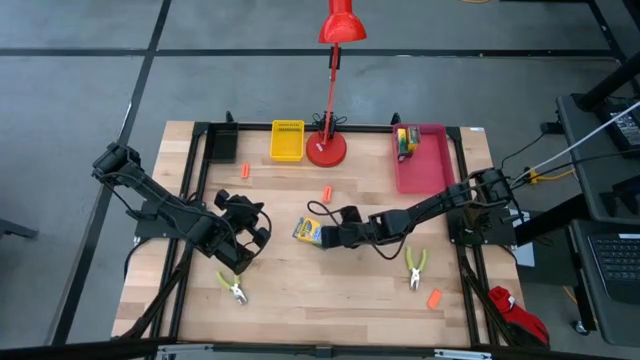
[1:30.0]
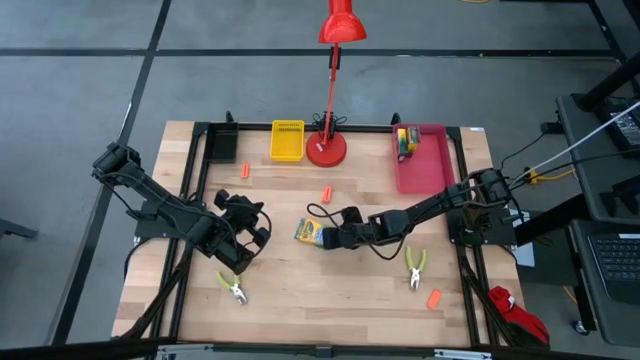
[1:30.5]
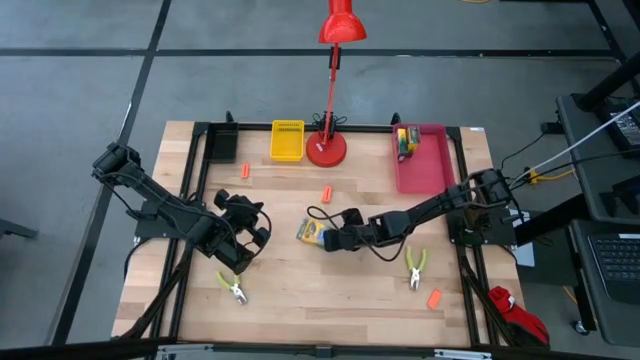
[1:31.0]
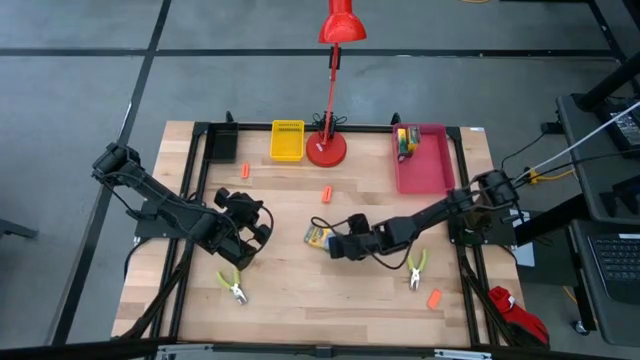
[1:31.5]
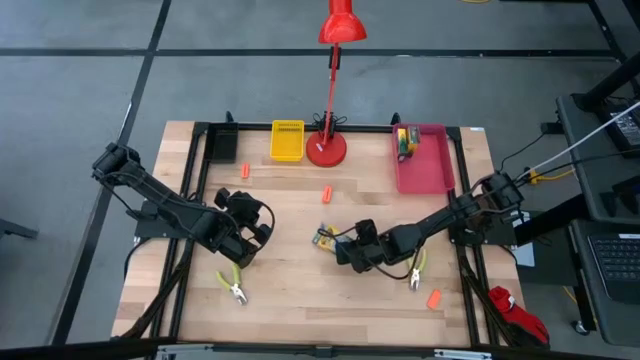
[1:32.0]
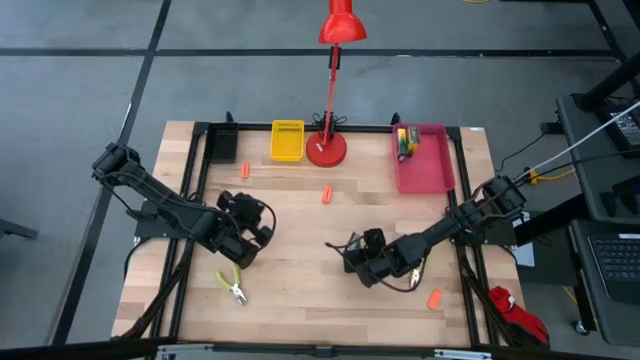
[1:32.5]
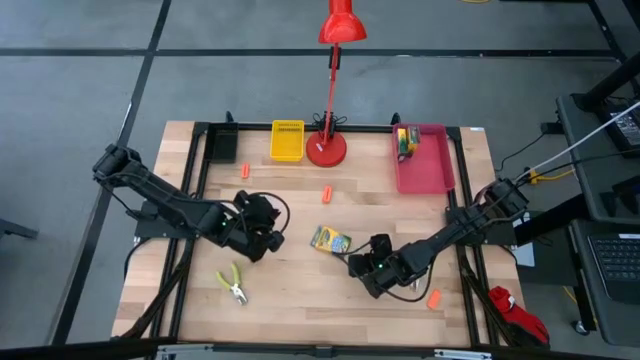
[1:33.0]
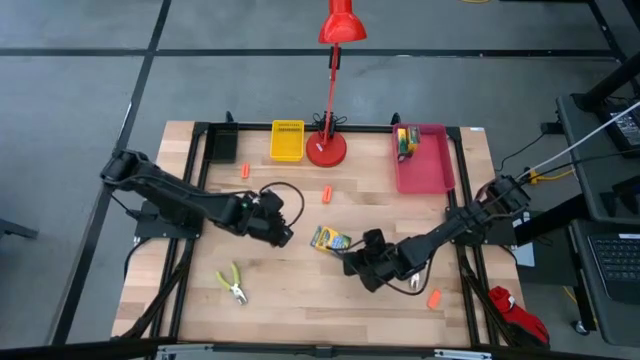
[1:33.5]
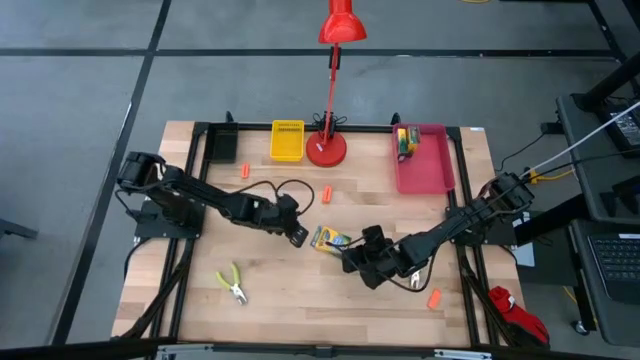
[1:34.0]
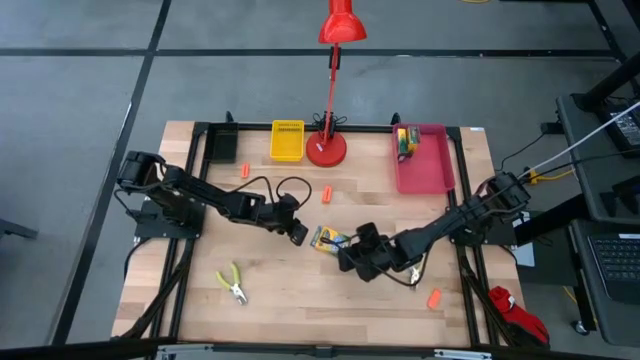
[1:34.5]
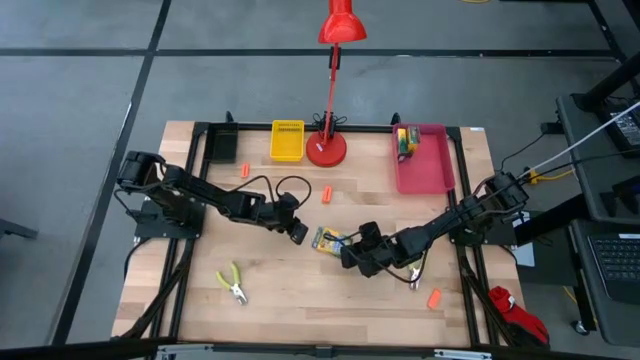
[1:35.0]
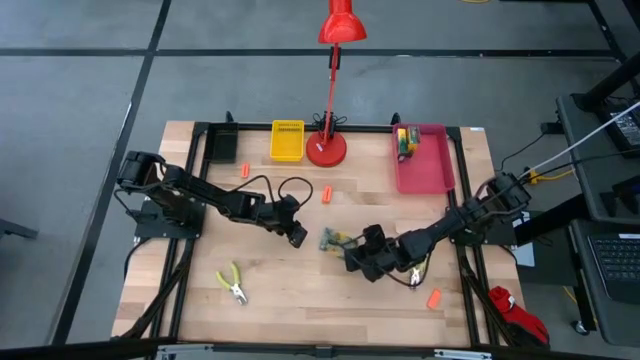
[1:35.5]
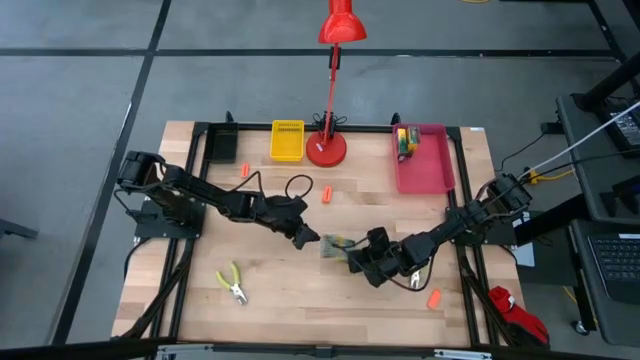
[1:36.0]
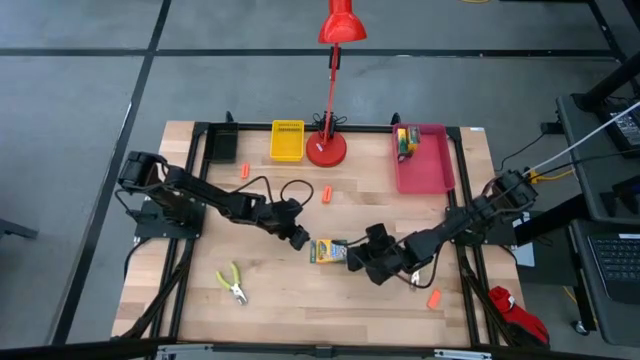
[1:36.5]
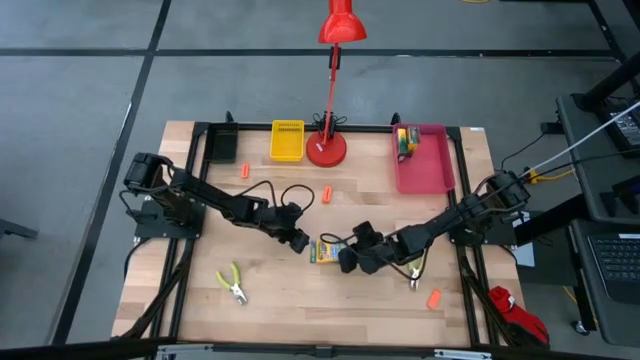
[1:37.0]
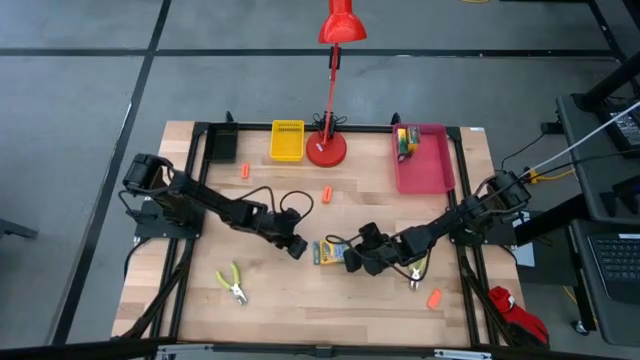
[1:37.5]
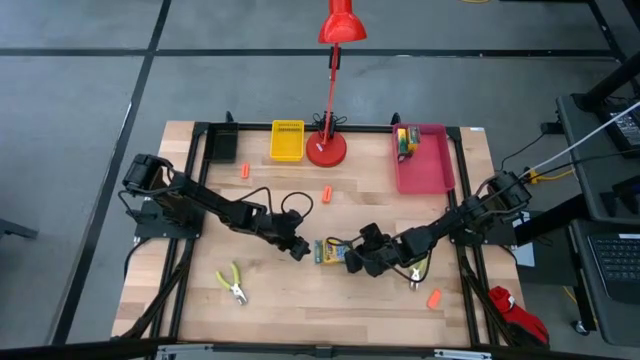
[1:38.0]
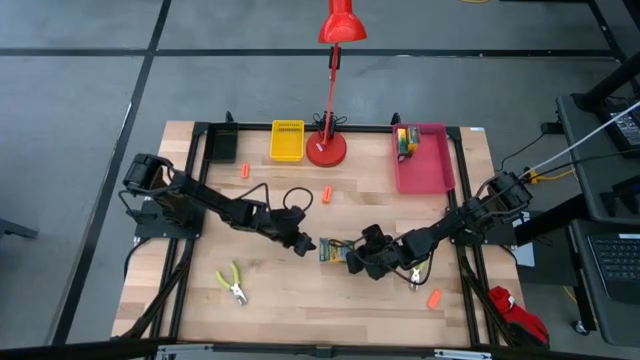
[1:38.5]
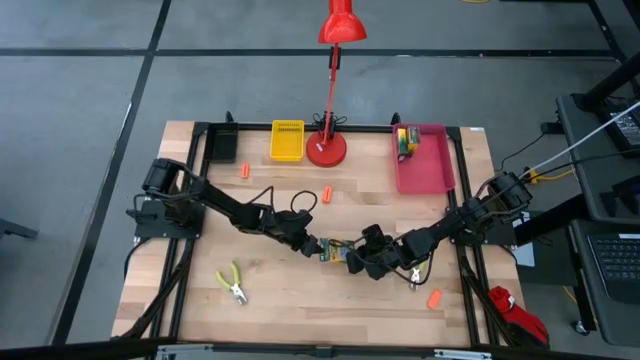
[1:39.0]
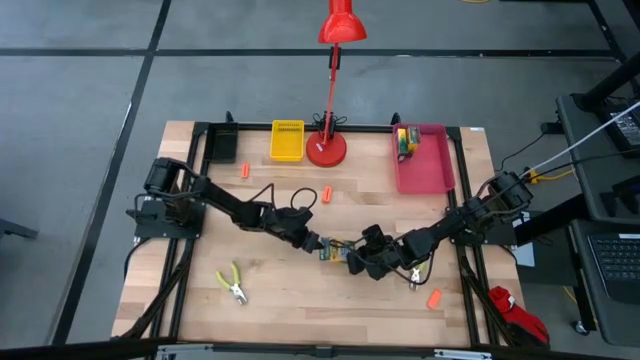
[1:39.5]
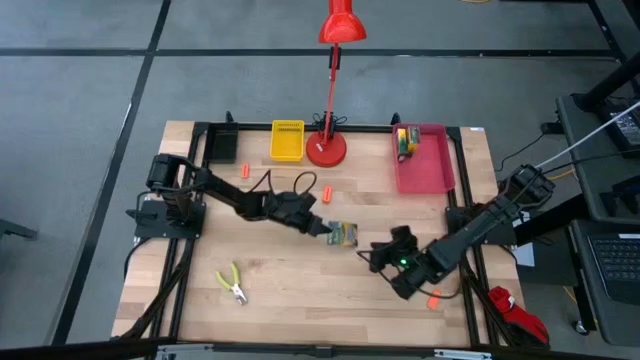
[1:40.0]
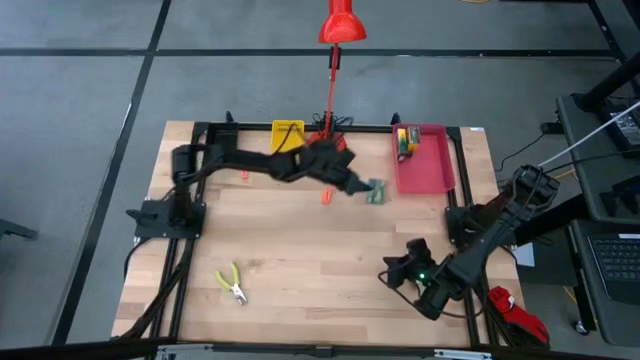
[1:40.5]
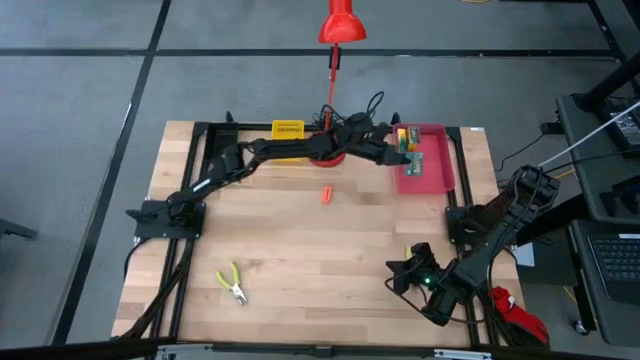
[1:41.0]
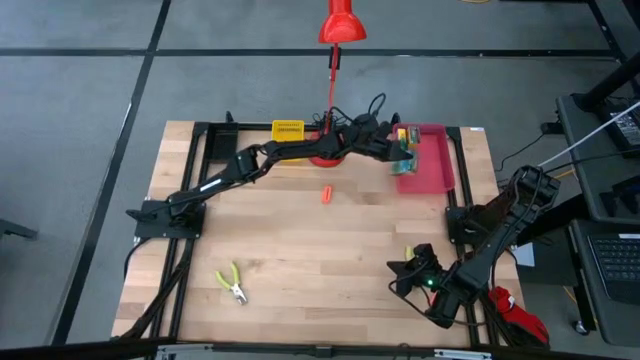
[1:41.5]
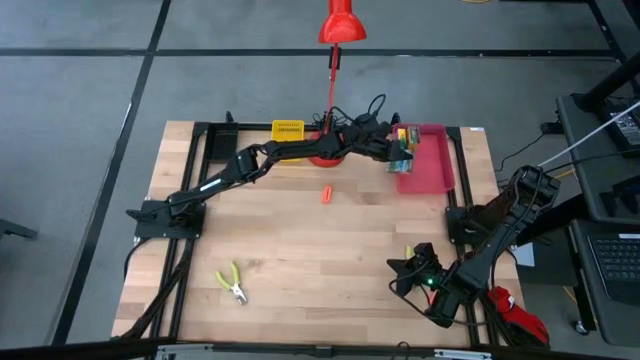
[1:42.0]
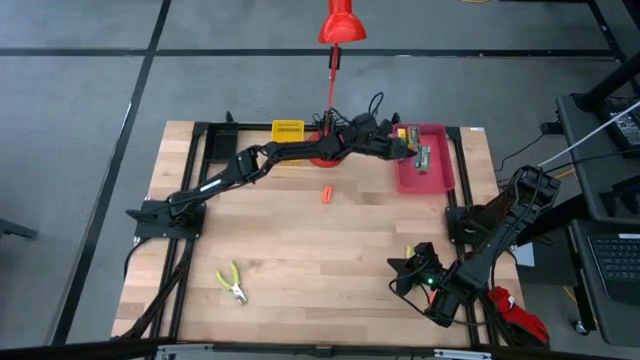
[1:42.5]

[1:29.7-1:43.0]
Task: Pick & Place School Supplies
Put the yellow crayon box into the red bin

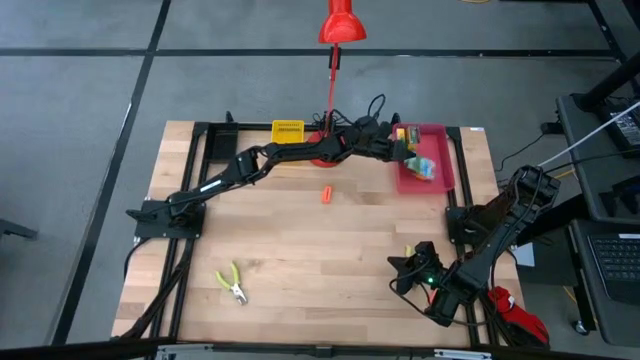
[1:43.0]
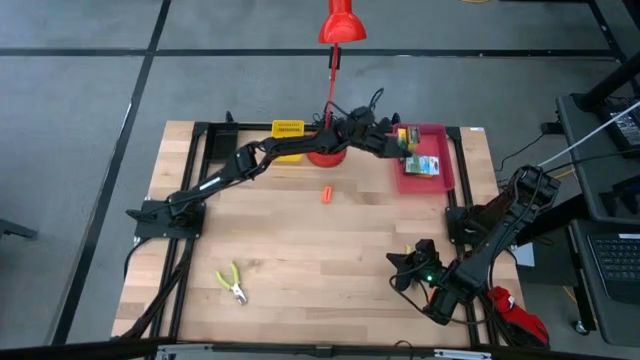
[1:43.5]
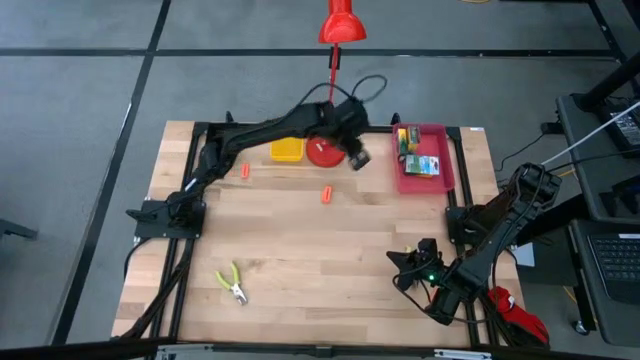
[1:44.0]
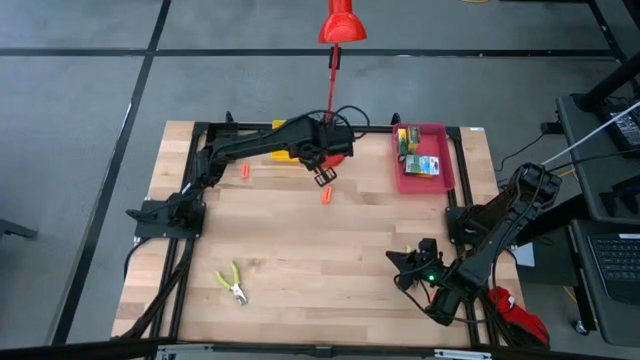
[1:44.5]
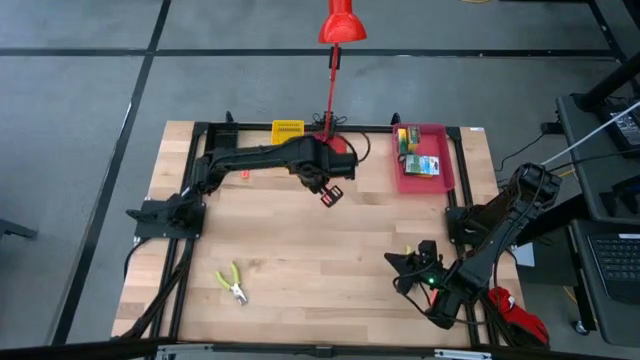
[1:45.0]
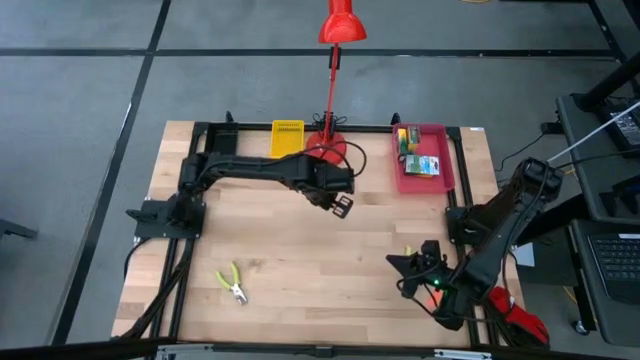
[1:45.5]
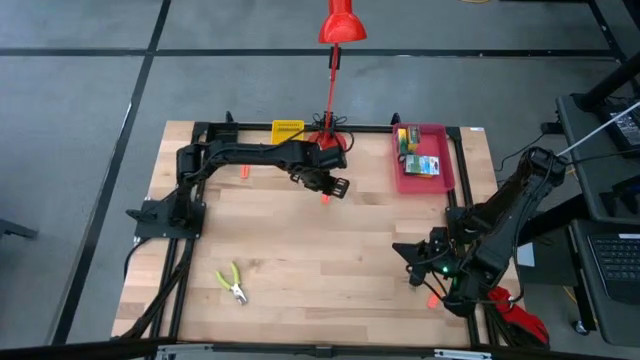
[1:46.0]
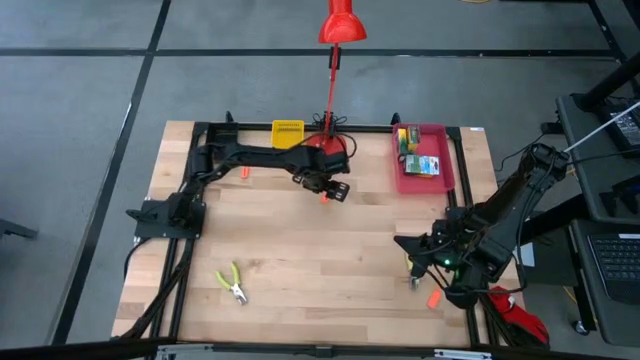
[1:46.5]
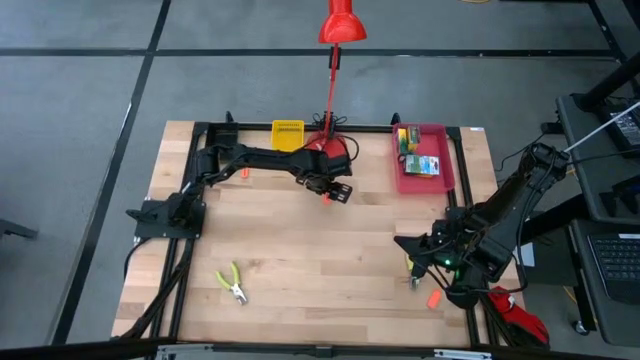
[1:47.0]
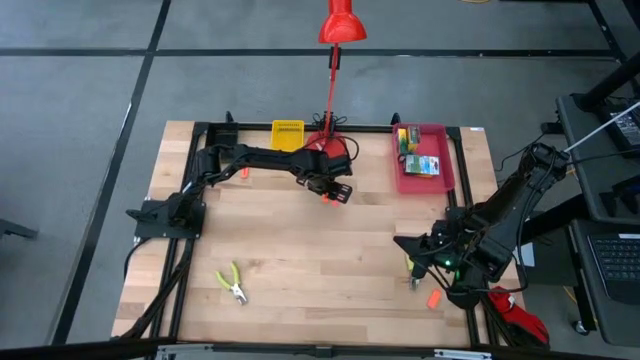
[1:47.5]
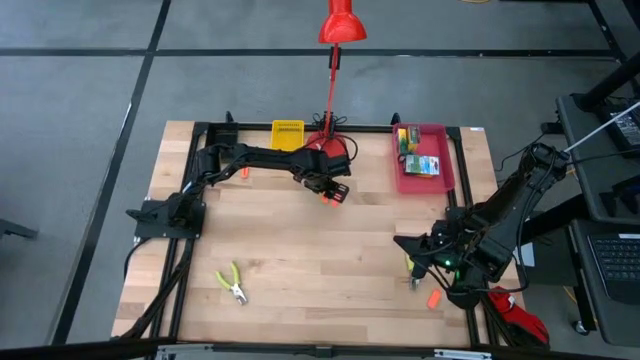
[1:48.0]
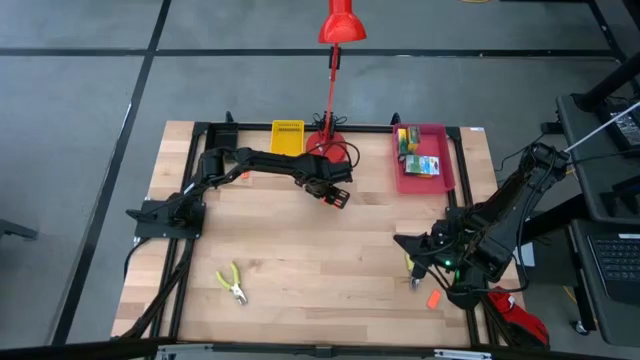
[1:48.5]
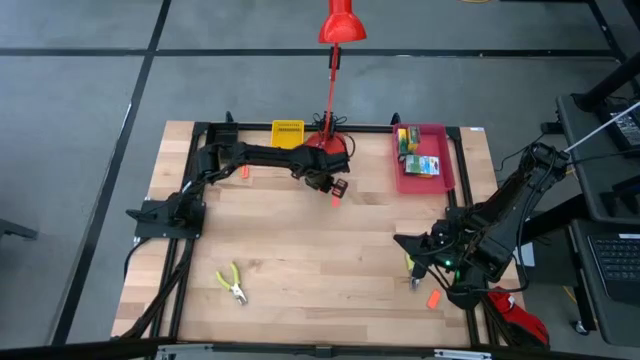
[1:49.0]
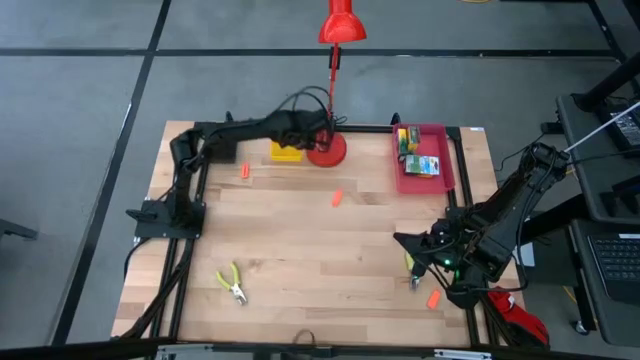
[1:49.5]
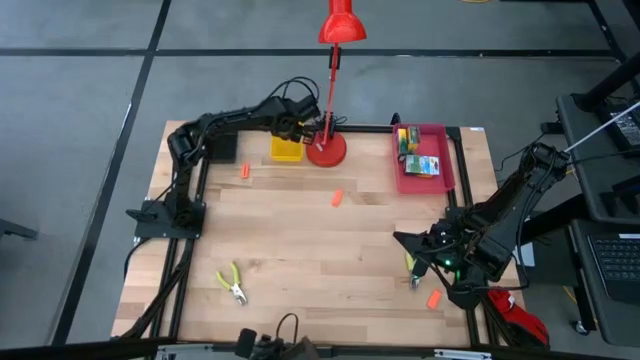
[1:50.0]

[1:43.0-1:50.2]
Put the orange eraser into the yellow bin

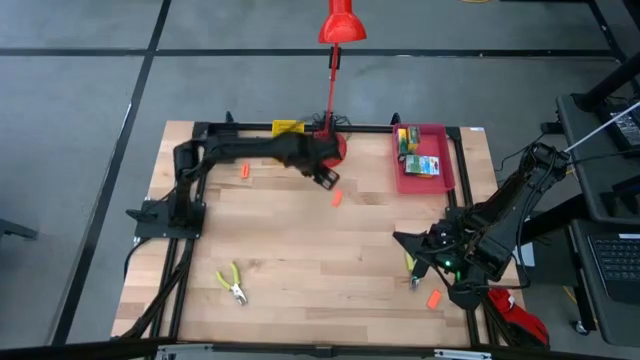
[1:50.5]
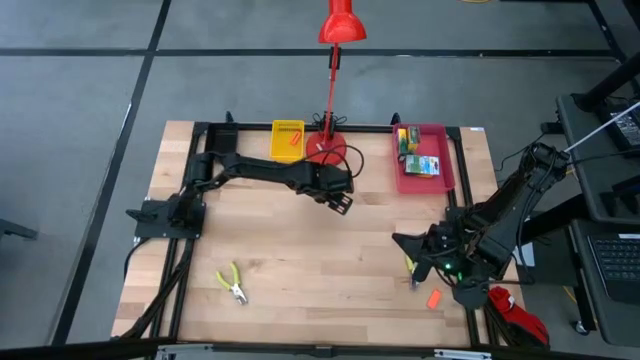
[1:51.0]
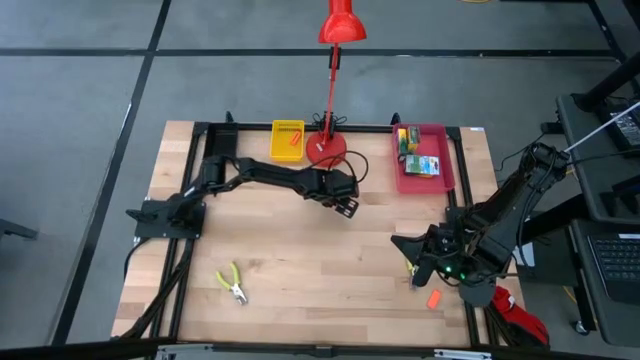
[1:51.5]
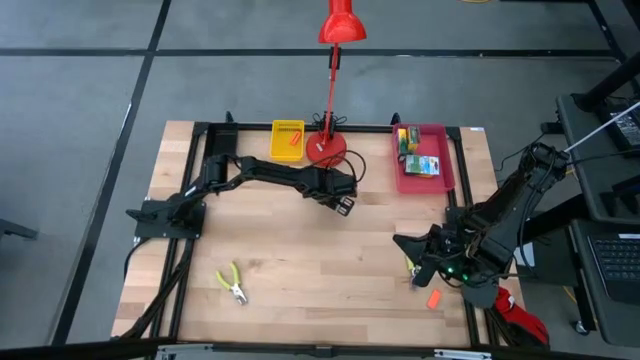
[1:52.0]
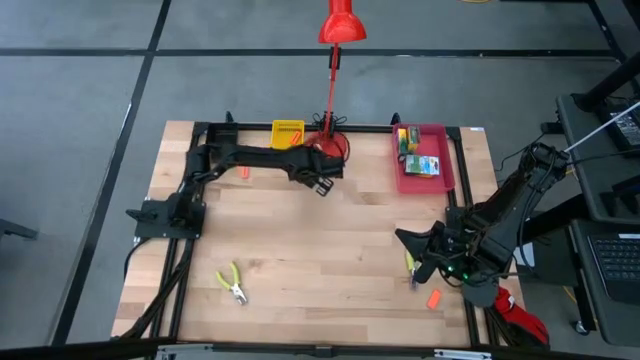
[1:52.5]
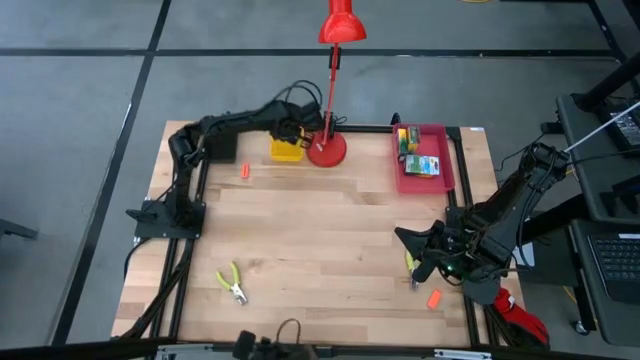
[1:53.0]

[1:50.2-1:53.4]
Put the orange eraser into the yellow bin
